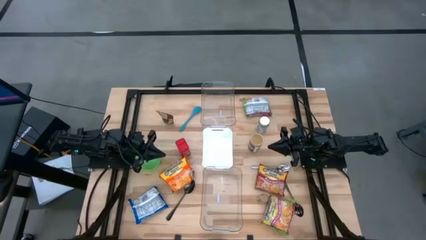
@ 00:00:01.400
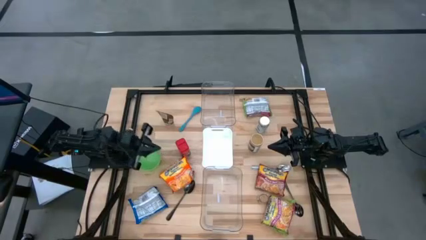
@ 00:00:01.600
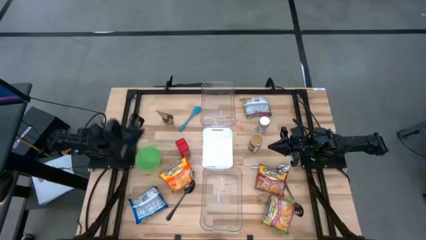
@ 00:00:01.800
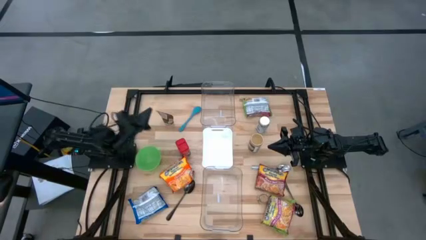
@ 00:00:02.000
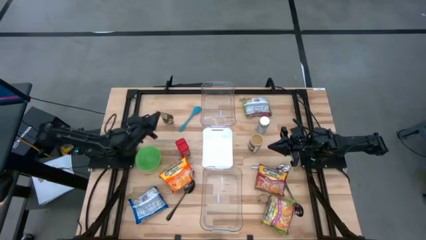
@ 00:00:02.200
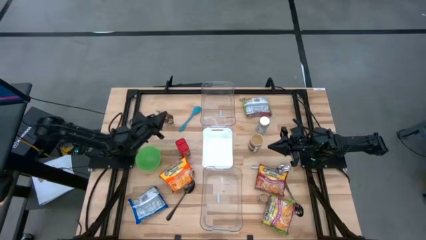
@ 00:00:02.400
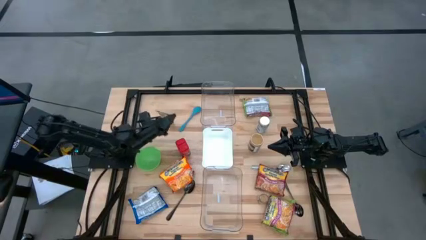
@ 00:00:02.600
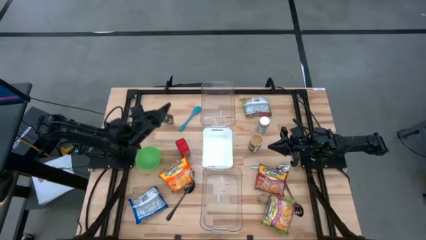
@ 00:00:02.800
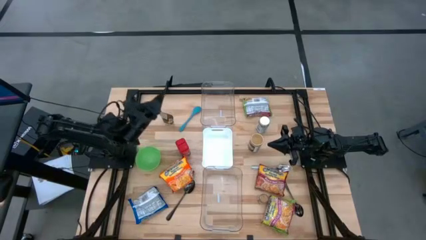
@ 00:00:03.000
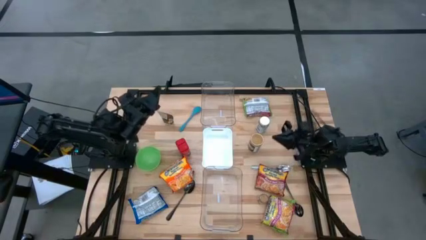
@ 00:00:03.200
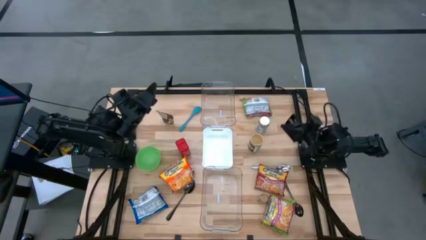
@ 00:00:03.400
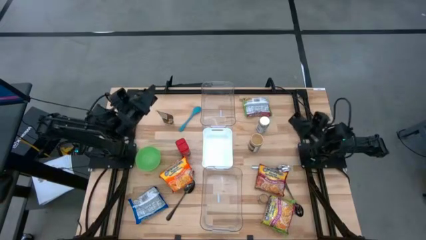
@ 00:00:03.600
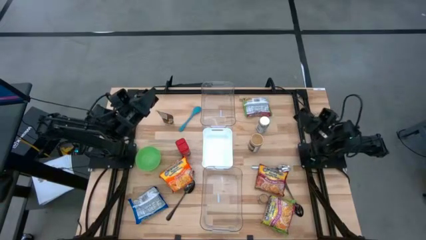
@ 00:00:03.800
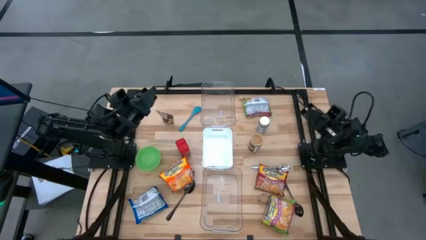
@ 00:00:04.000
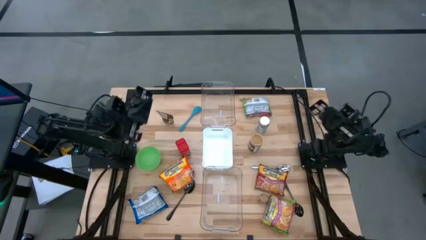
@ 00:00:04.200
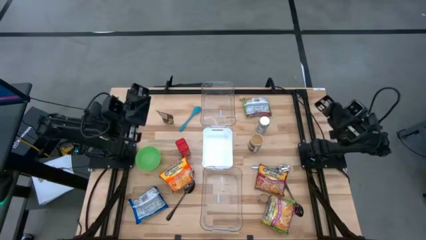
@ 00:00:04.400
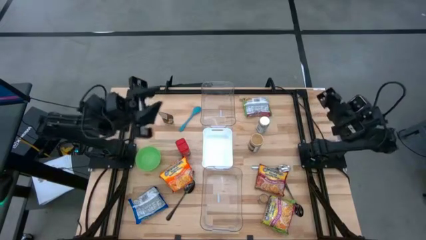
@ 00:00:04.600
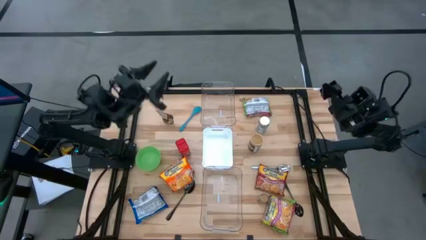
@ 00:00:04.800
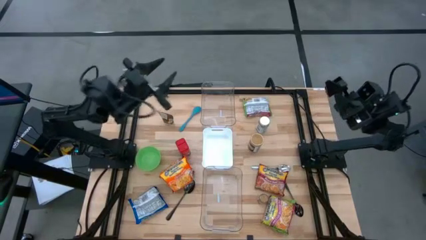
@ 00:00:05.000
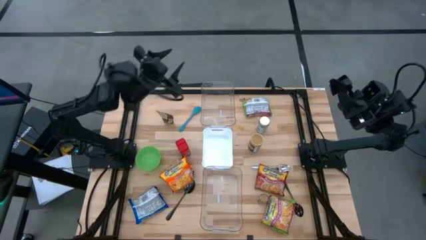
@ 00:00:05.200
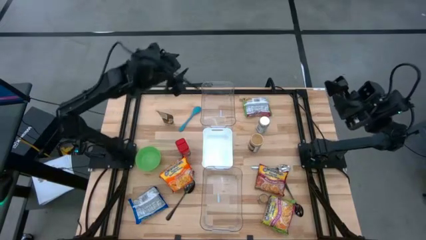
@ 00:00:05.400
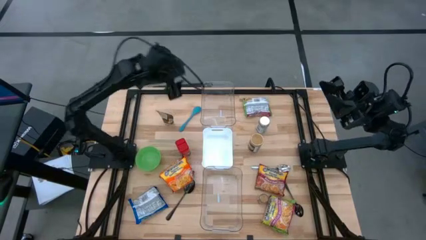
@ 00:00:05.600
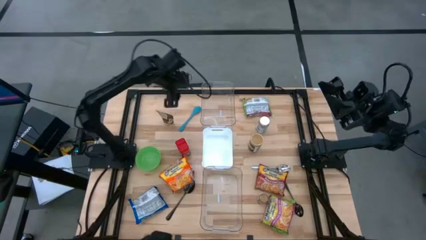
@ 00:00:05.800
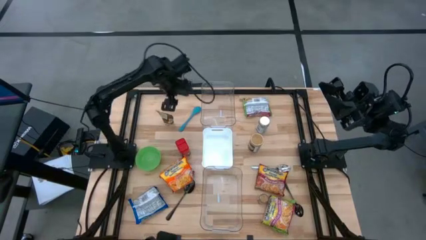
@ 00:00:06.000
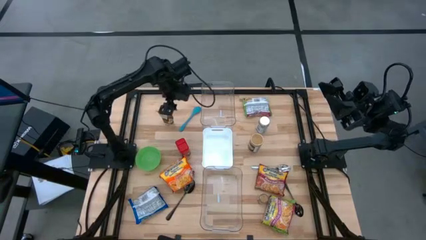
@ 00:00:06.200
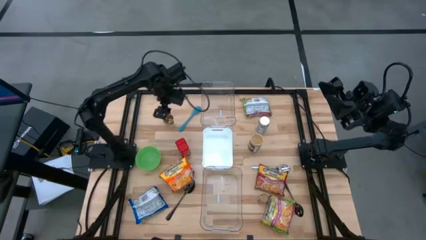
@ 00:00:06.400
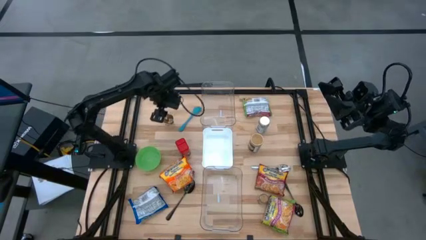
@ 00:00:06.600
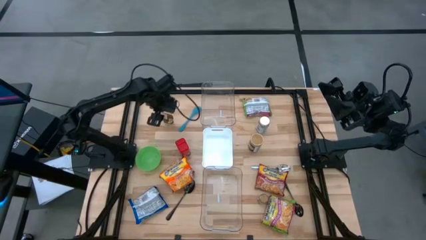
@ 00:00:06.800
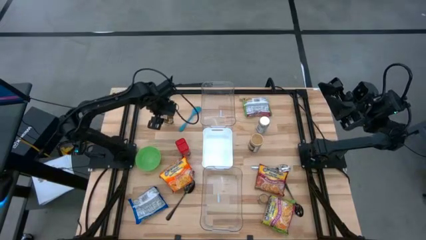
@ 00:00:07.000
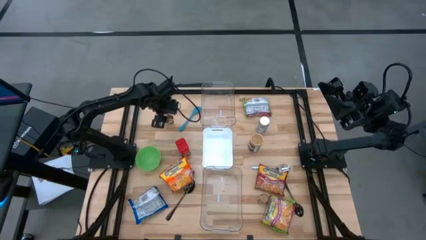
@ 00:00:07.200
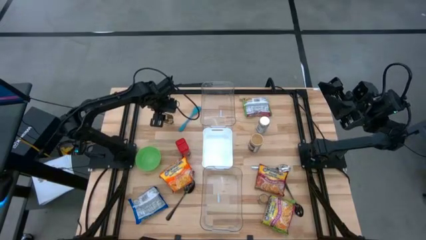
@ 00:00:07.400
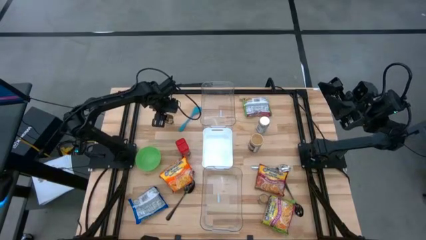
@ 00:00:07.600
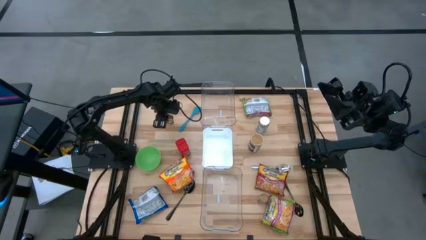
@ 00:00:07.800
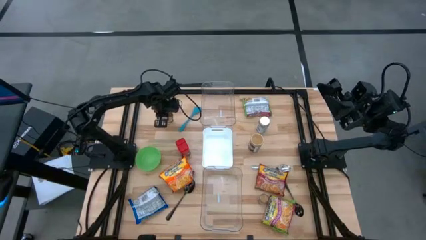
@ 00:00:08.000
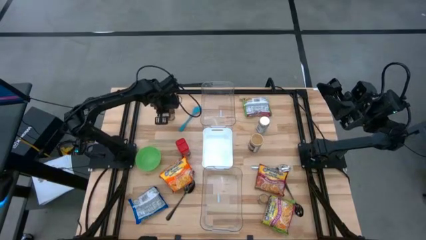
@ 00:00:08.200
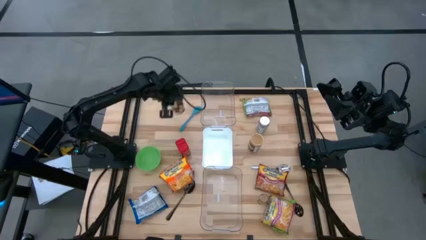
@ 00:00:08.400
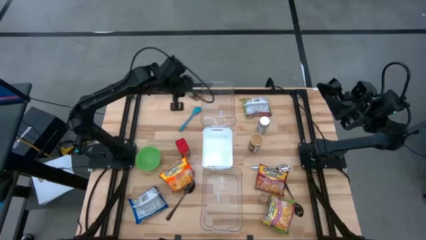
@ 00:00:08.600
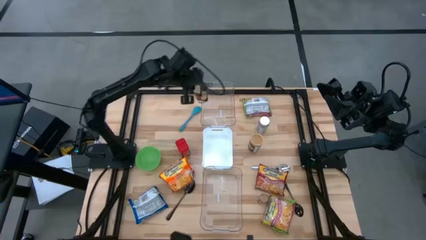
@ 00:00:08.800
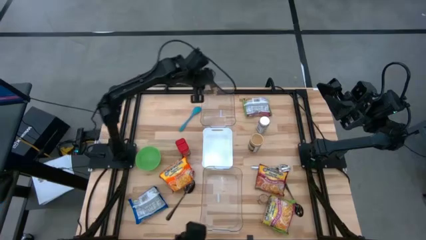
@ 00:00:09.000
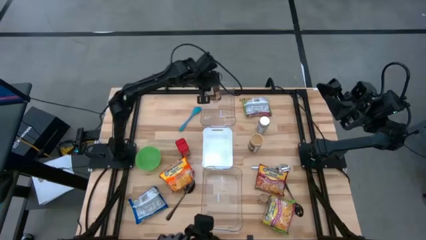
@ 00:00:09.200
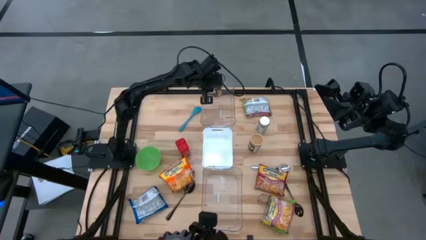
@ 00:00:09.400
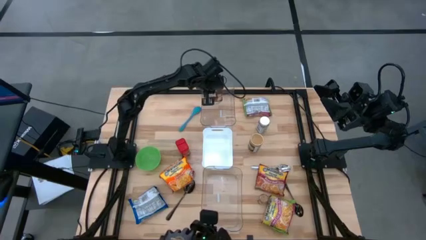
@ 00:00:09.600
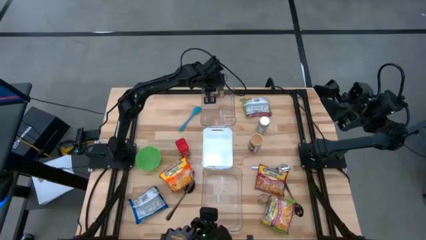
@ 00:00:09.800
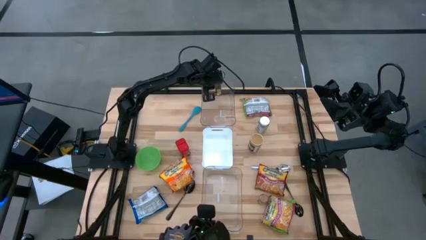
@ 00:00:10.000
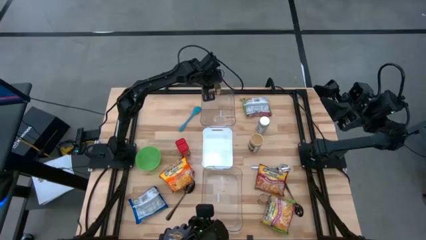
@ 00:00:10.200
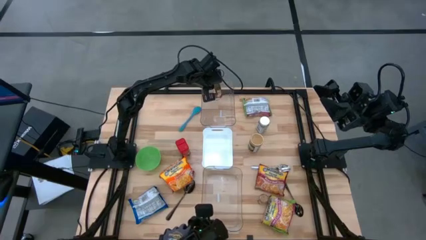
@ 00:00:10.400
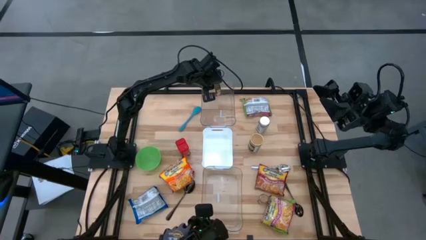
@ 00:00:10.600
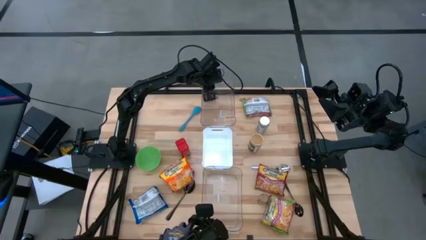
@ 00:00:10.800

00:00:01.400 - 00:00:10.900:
Task: Pick & Place Food Item
Put the orange seasoning pack into the top transparent bin

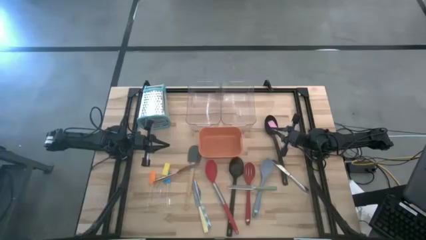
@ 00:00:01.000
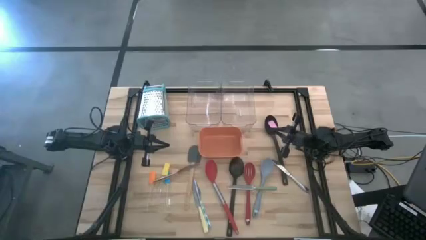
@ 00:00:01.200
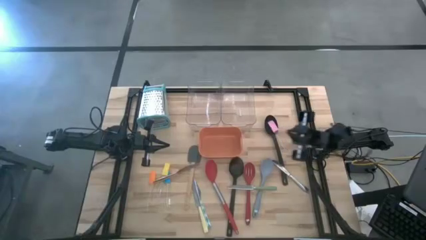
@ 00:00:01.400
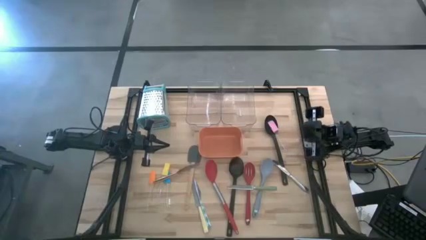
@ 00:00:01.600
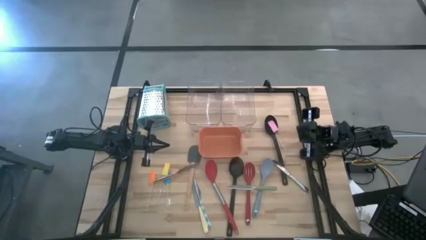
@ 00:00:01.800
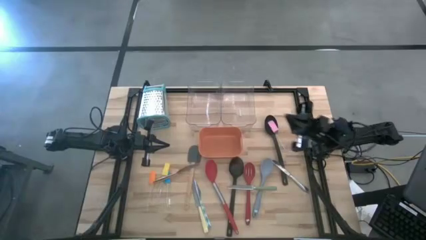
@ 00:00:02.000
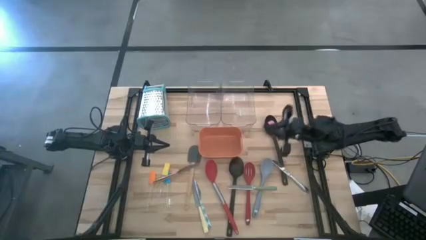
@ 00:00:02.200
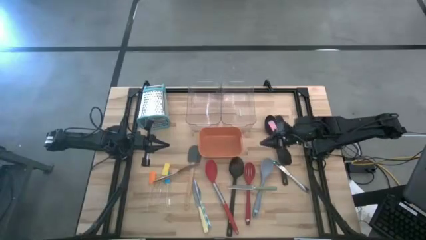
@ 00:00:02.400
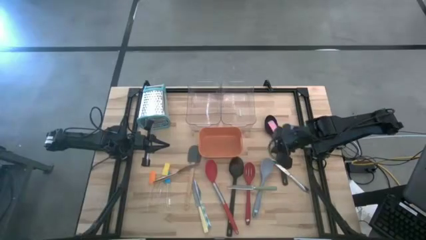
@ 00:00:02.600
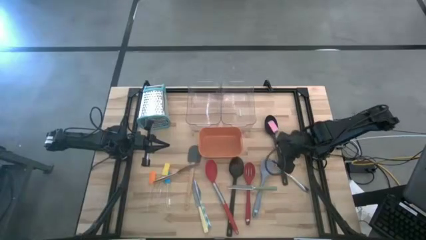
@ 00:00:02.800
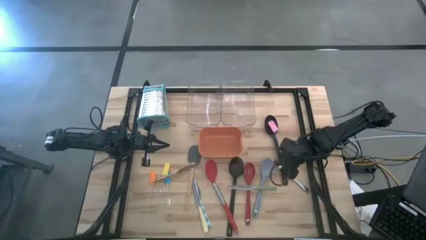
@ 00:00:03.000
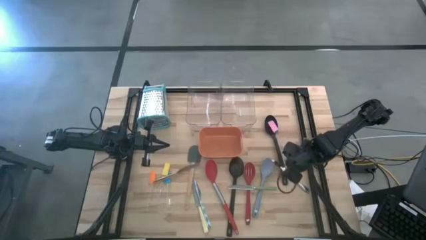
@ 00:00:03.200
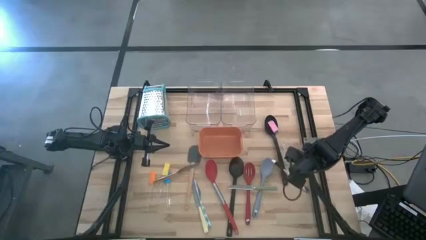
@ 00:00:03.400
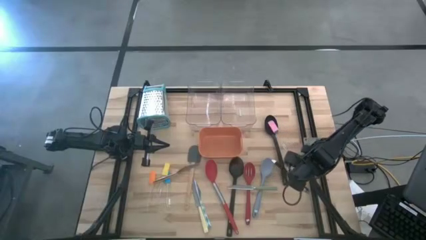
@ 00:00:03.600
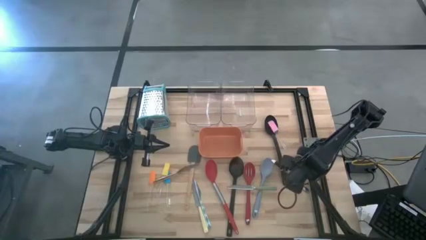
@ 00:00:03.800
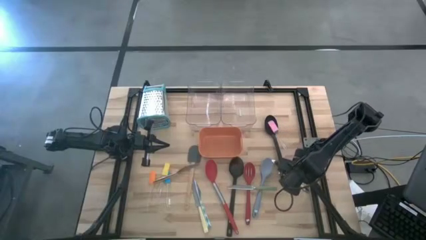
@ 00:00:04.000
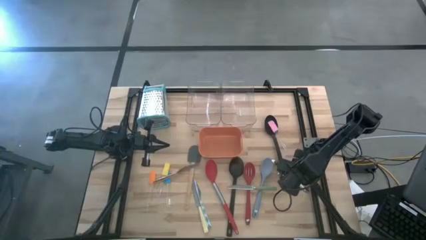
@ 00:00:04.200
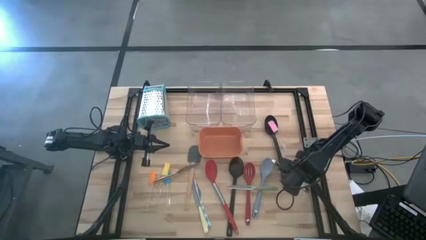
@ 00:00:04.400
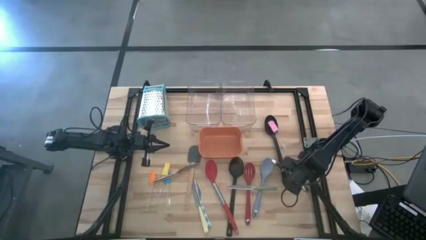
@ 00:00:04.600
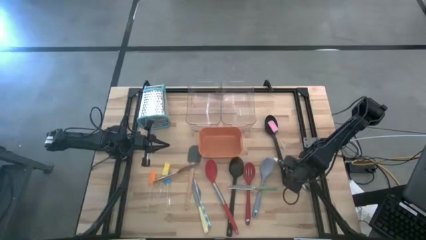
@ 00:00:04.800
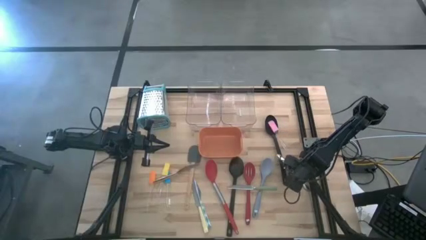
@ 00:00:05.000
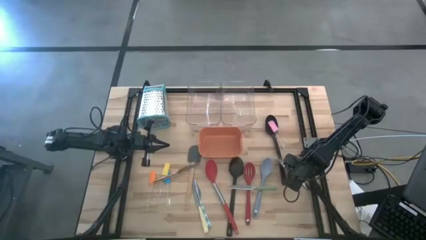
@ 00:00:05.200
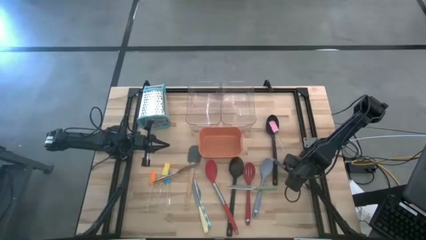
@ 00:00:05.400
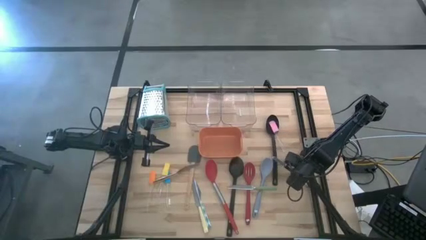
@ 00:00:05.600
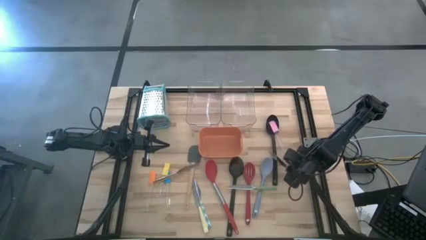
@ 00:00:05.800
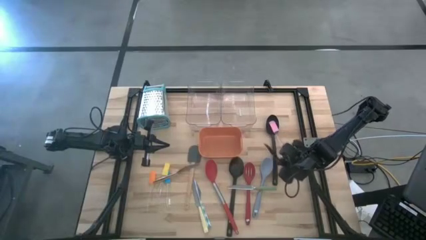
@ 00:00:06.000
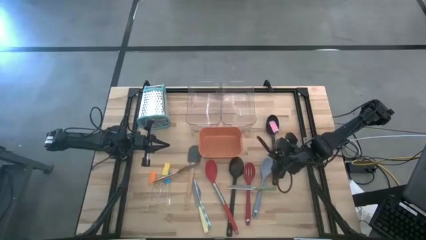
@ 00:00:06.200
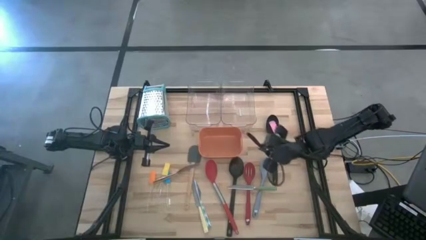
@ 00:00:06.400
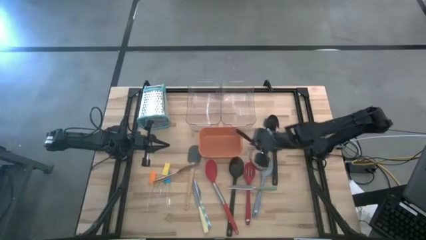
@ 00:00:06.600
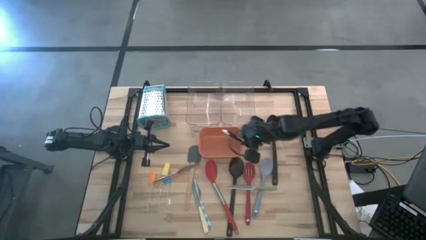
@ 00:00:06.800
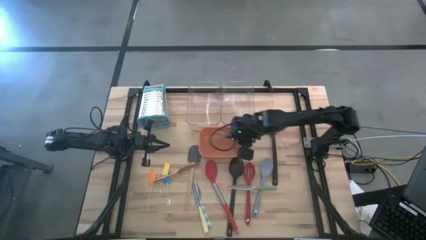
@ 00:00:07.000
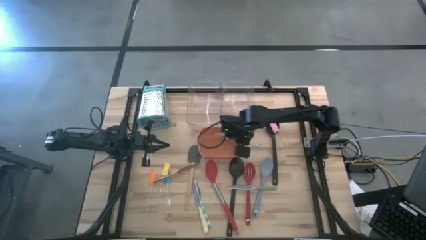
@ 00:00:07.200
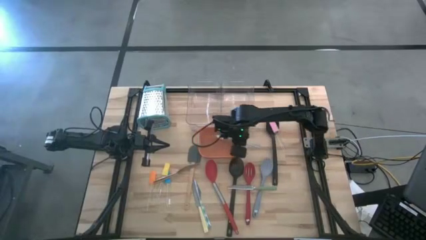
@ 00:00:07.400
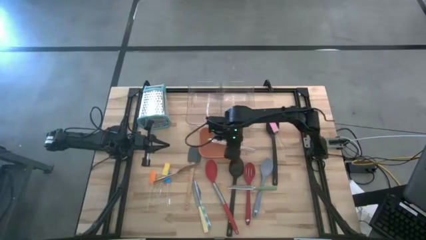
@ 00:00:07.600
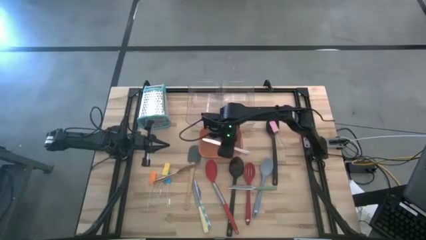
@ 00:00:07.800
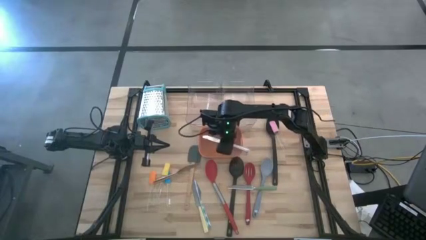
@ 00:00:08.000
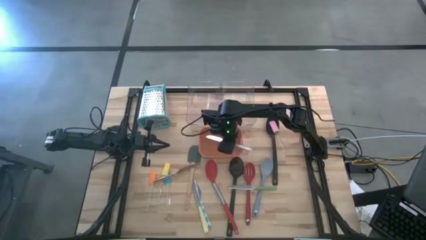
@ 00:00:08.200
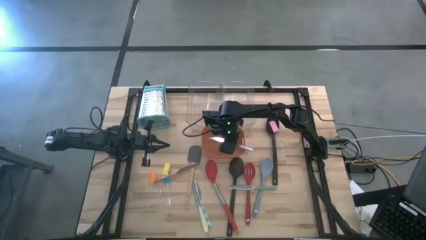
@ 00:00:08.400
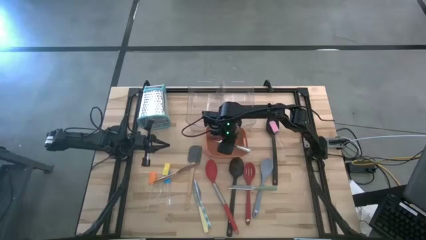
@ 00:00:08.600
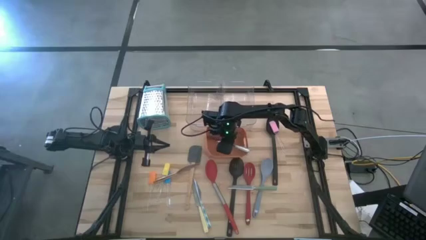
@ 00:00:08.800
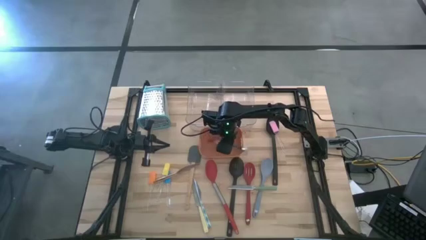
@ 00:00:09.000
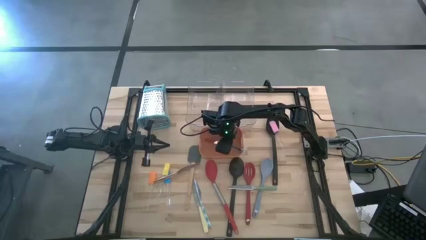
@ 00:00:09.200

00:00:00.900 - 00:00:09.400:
Task: Pick & Place Kitchen Items
Put the silver knife into the orange bin
